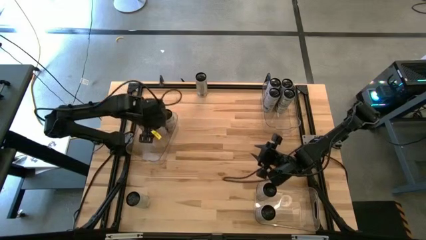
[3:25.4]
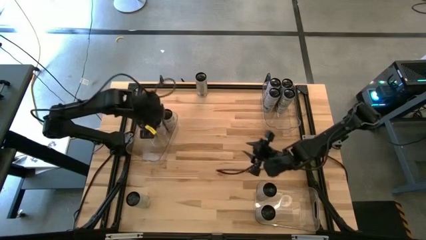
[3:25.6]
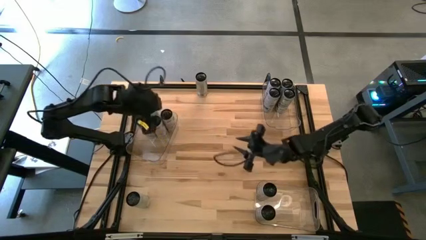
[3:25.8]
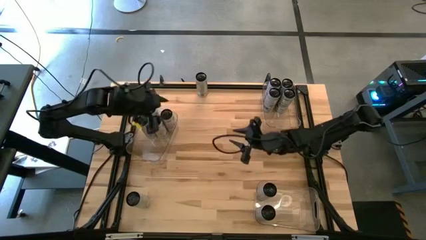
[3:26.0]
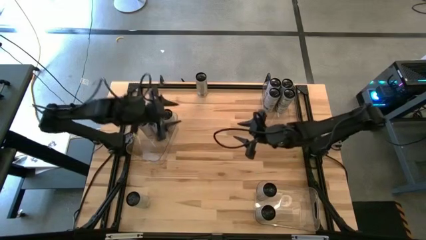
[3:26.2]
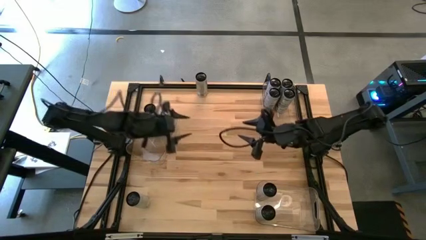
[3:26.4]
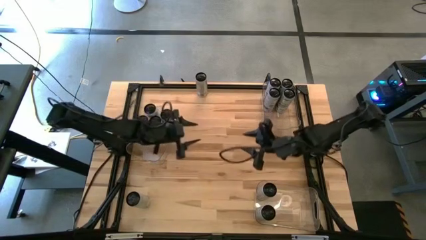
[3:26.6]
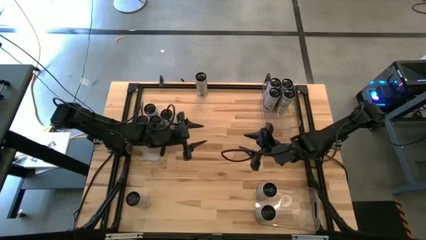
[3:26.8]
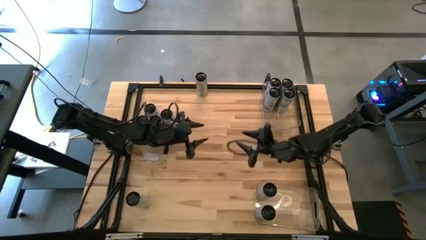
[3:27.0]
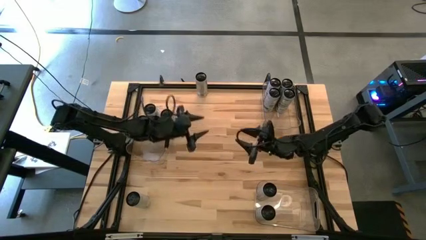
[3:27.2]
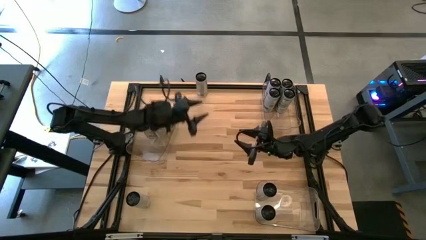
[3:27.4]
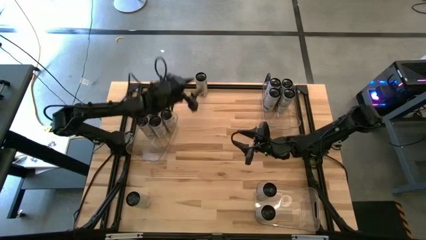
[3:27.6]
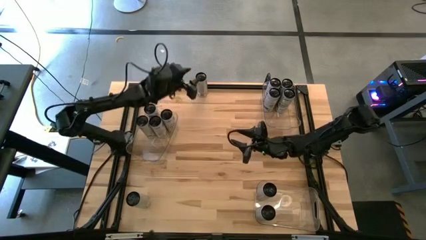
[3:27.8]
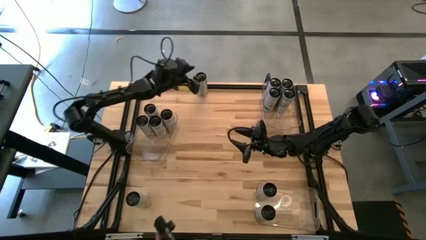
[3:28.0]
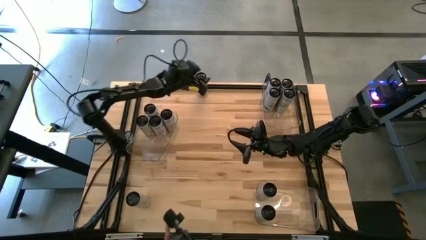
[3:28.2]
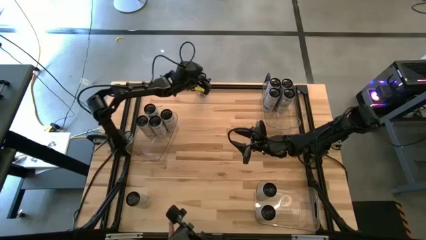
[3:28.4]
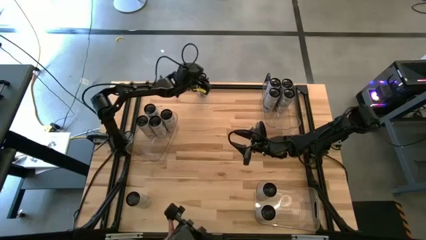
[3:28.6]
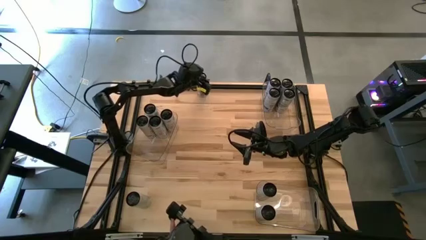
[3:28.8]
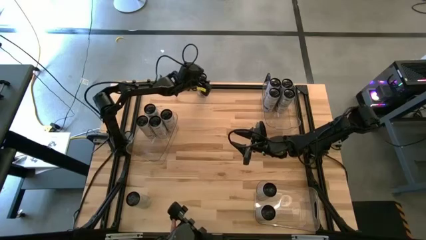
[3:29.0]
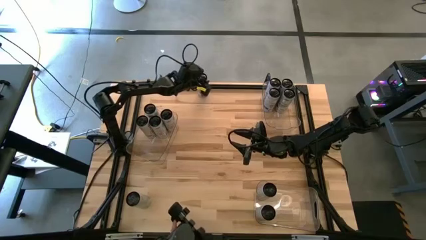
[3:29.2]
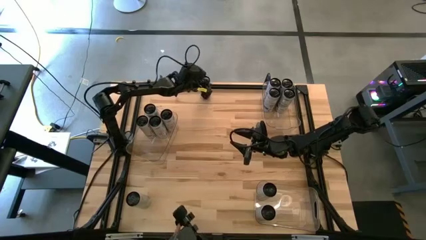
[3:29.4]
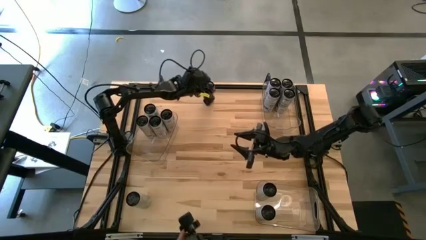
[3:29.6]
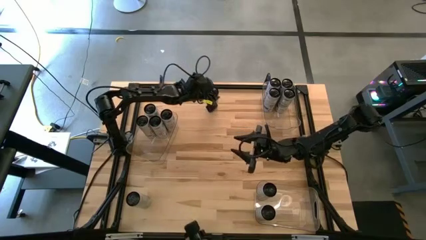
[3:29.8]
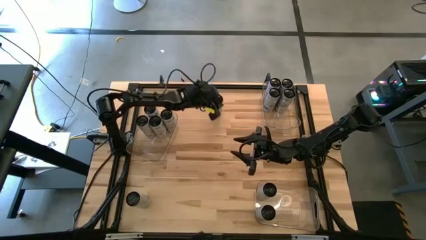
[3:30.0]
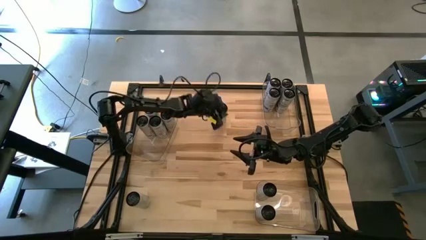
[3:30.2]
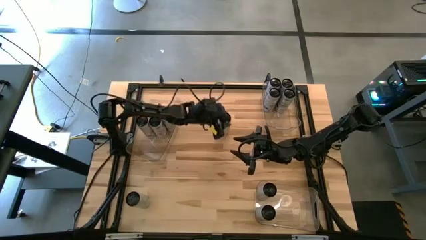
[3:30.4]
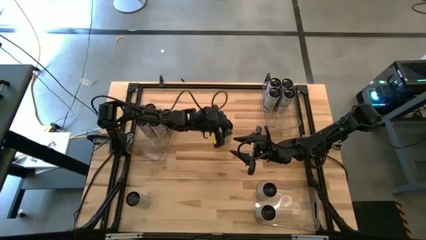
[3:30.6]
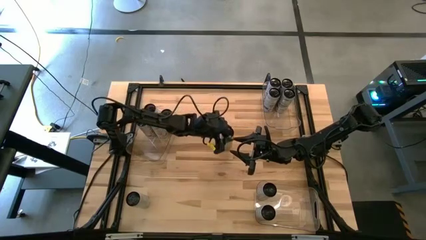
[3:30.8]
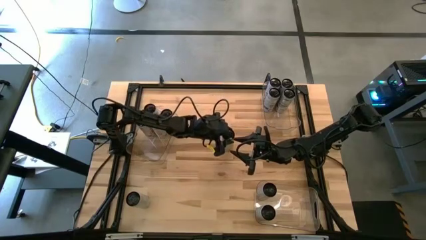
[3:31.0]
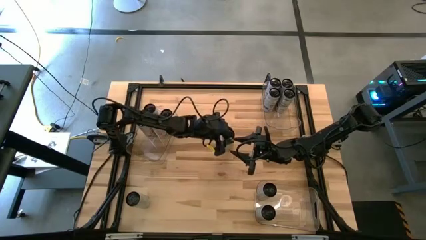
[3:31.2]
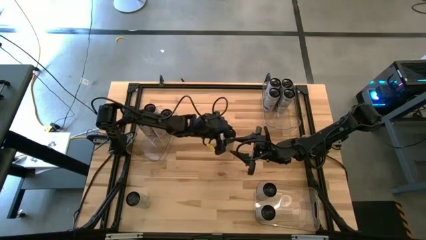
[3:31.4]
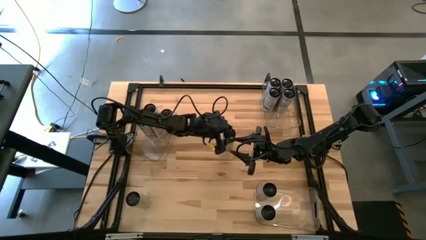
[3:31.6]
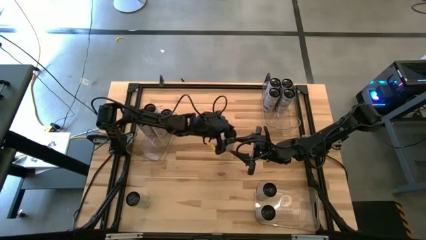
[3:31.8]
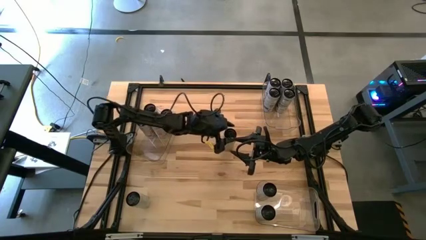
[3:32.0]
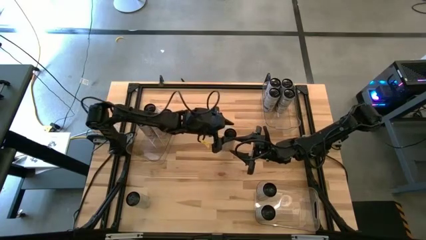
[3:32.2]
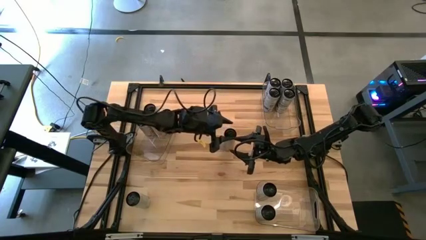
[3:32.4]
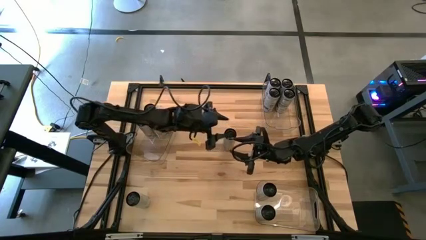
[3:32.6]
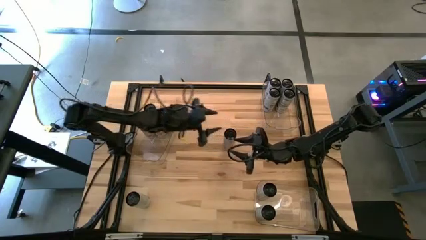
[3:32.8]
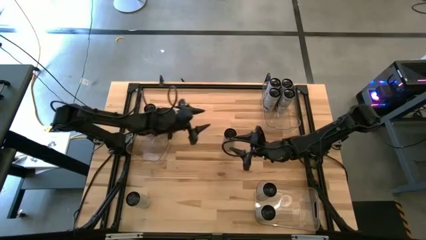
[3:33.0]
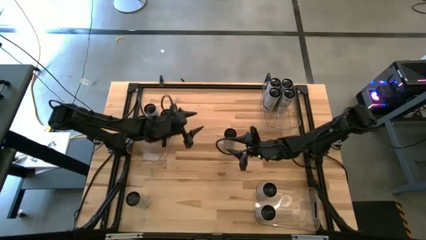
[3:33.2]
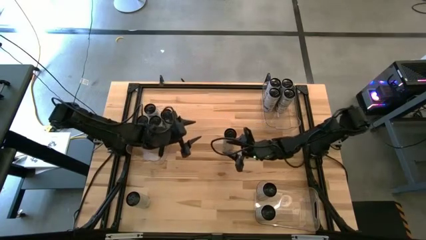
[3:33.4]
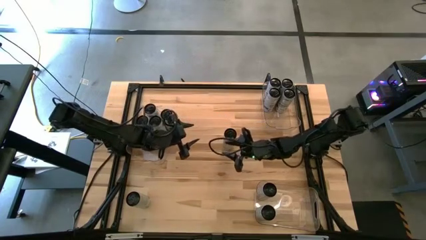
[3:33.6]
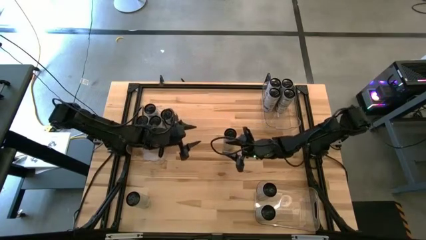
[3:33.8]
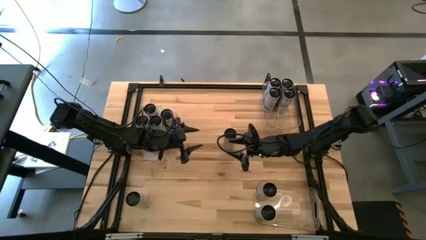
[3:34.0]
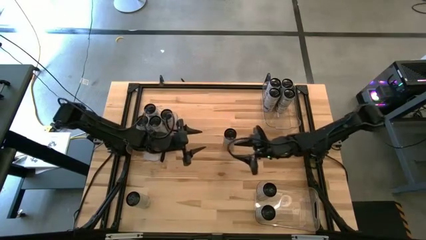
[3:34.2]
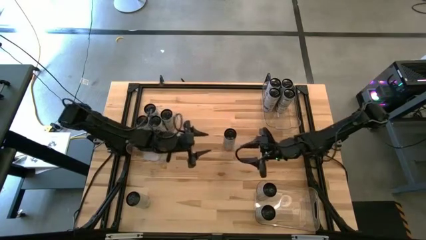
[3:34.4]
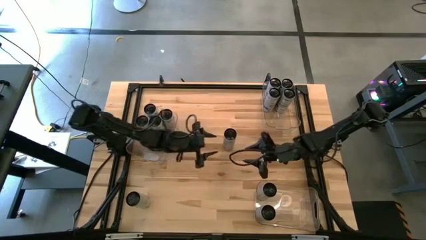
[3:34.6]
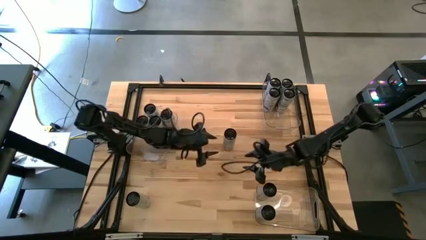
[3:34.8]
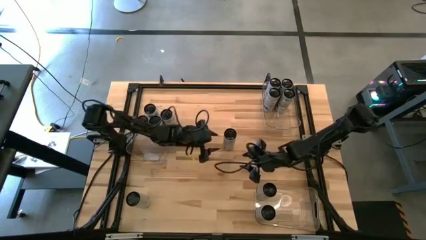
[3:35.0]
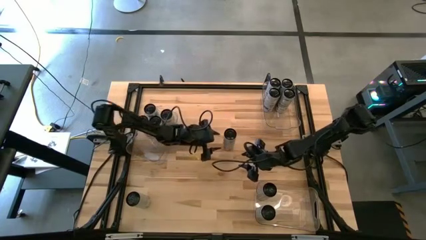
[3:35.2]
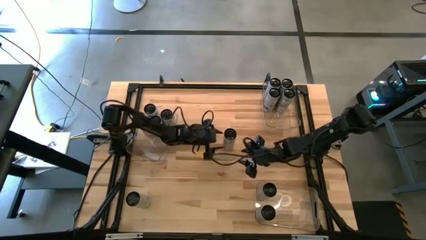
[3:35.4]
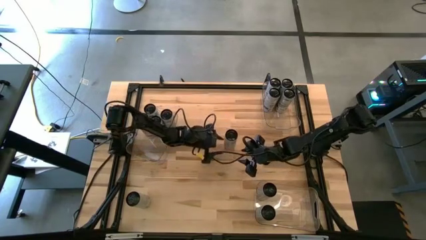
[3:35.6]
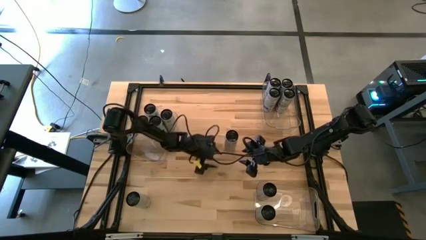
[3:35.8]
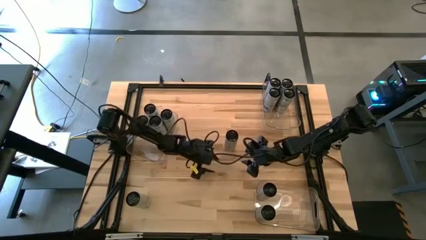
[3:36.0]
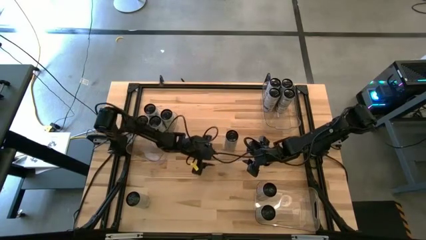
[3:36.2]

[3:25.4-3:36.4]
Task: Sort soda cans
Put the white-yellow soda can into the bottom transparent bin

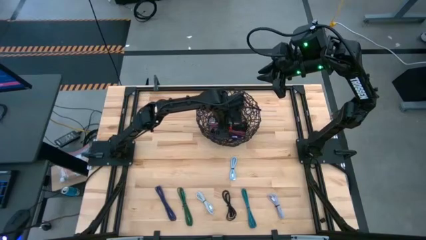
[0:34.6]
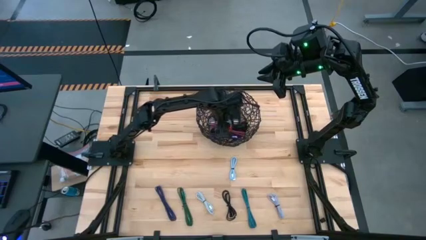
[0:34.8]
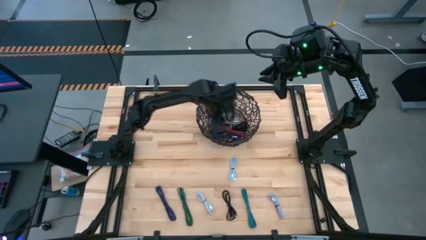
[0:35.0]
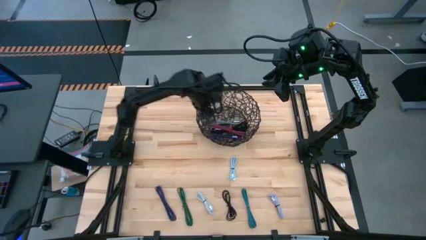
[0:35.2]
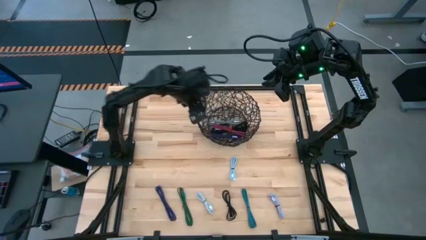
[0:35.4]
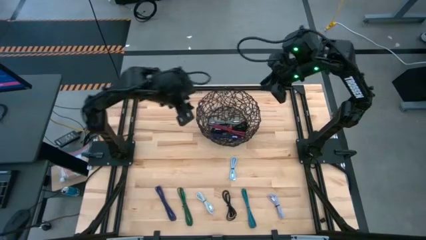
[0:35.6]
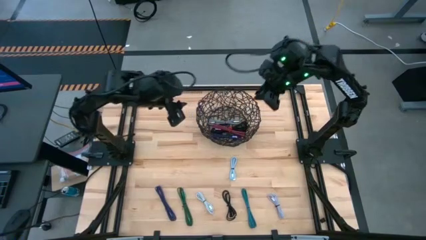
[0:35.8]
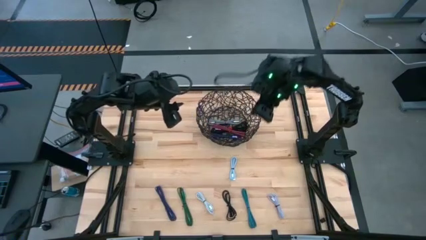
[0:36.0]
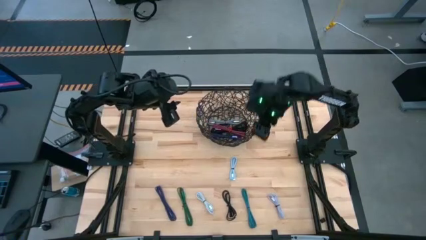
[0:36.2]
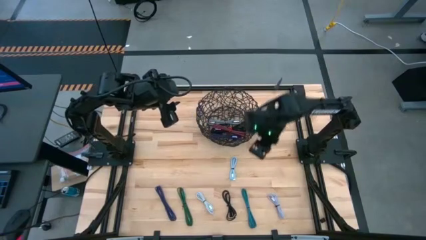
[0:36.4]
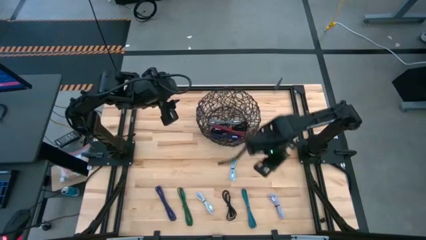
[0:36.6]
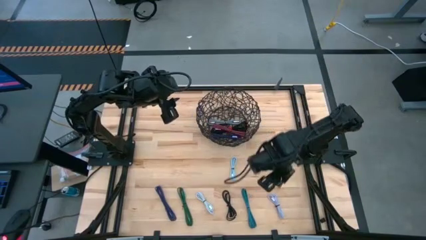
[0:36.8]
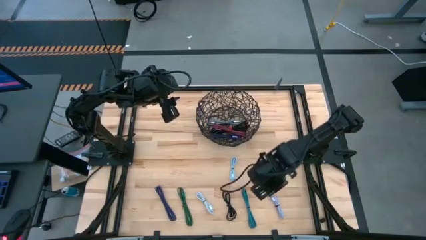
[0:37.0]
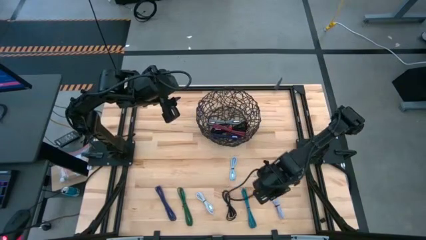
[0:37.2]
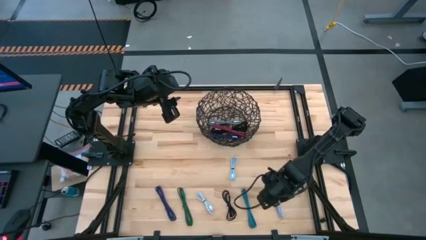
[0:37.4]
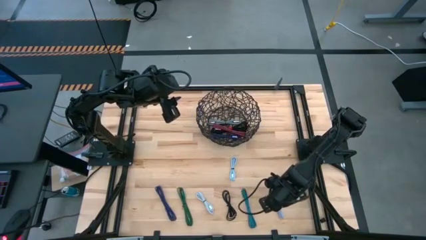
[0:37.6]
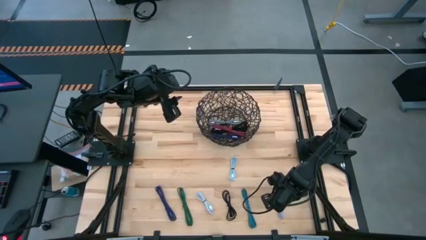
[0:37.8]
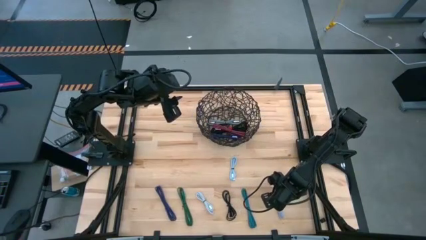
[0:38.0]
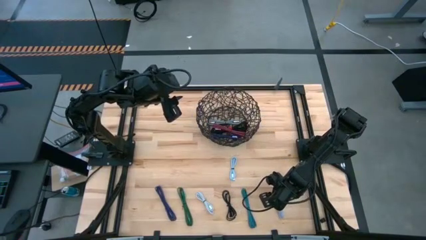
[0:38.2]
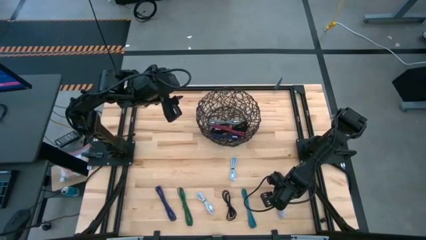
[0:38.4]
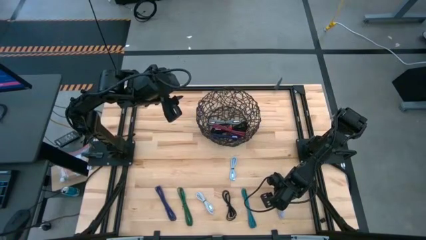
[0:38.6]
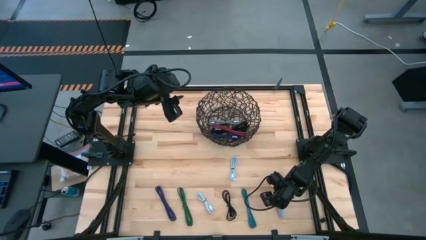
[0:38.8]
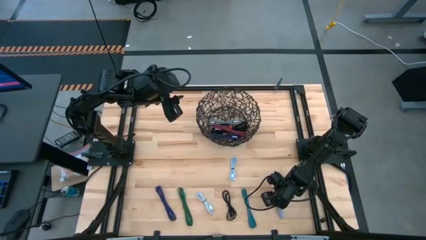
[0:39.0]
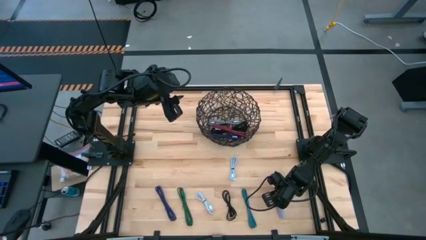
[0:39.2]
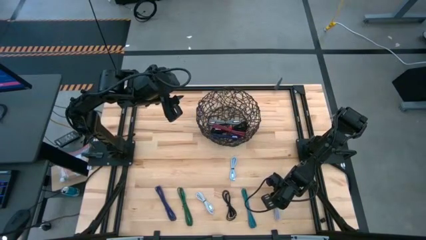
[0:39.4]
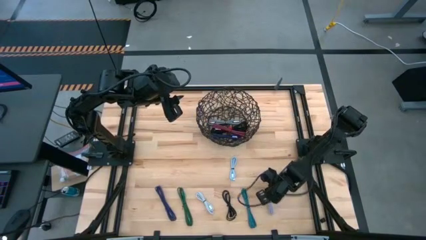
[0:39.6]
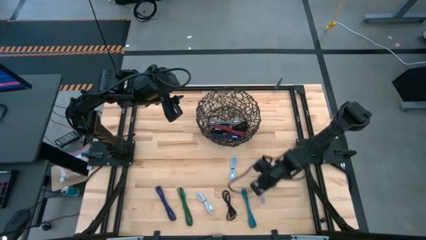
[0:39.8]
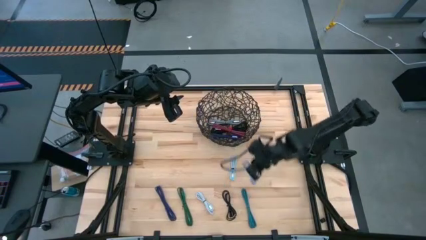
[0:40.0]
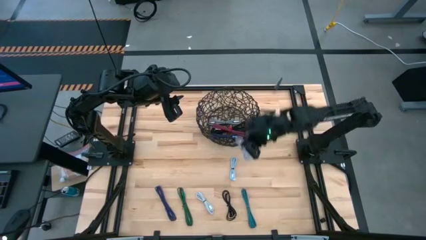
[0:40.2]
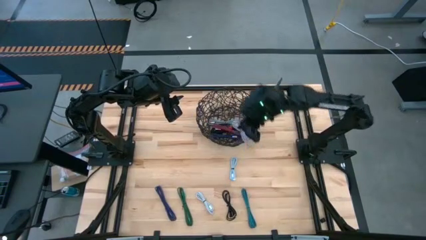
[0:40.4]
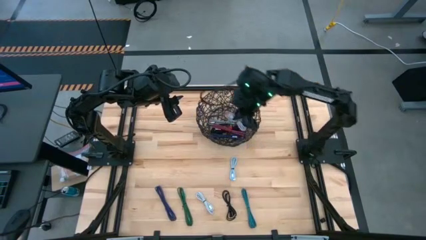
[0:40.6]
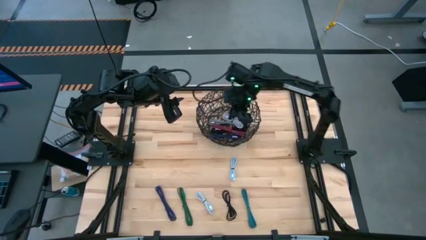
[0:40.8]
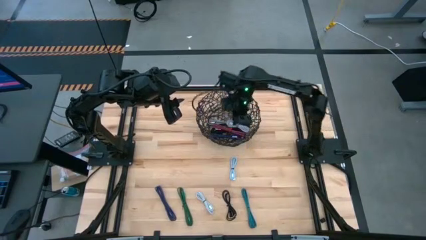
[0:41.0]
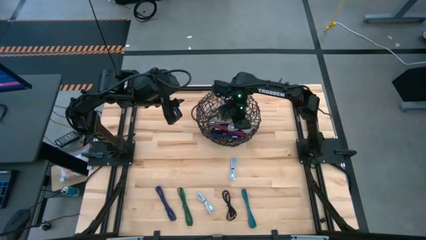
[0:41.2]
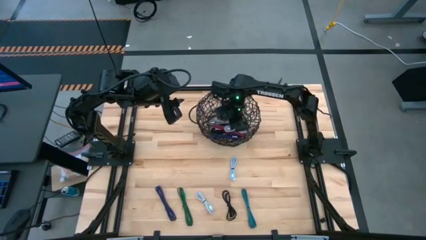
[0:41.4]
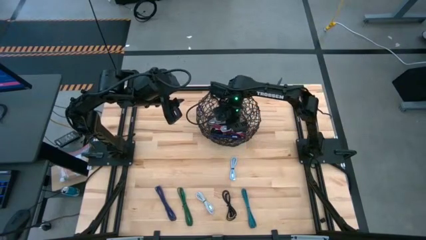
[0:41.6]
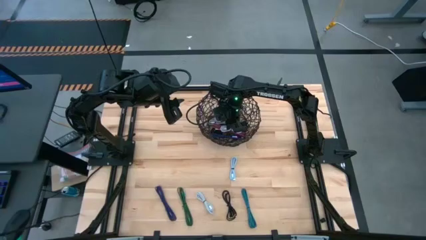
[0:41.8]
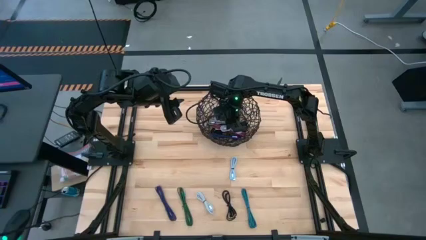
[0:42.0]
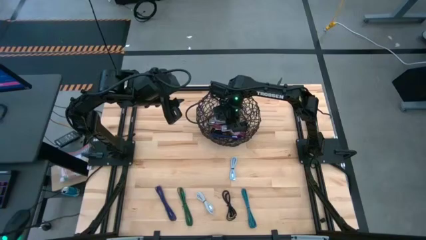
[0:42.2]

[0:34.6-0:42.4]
Task: Pick and place USB-C Cables
Put the right gray charger cable into the black mesh basket
